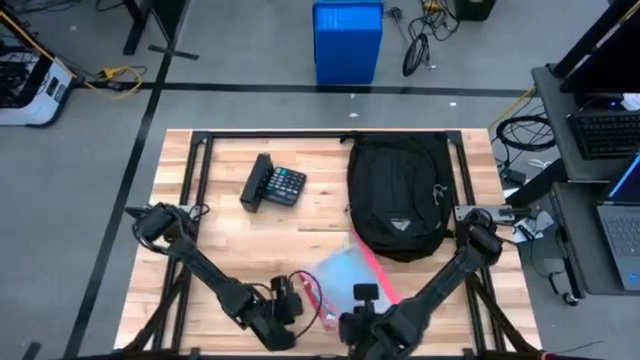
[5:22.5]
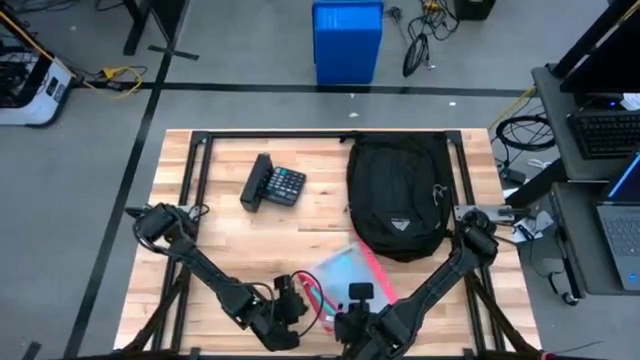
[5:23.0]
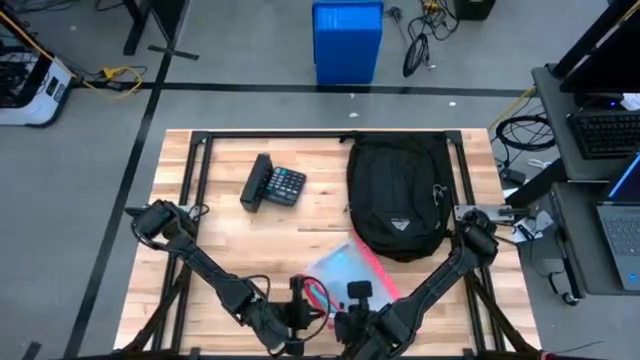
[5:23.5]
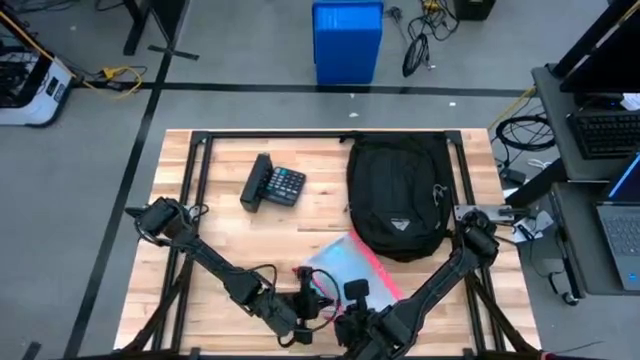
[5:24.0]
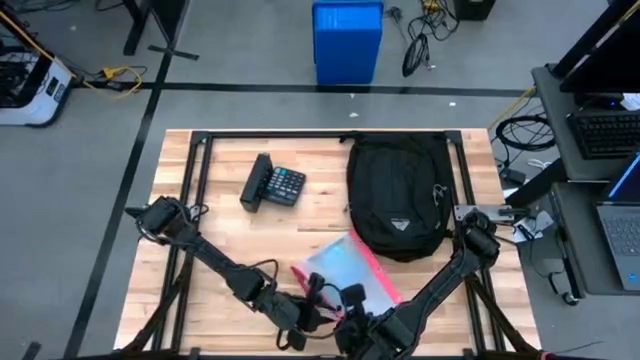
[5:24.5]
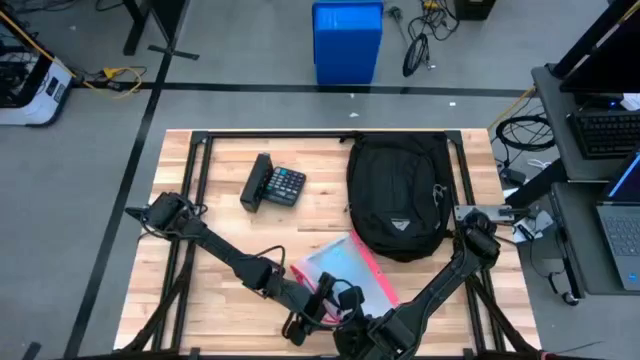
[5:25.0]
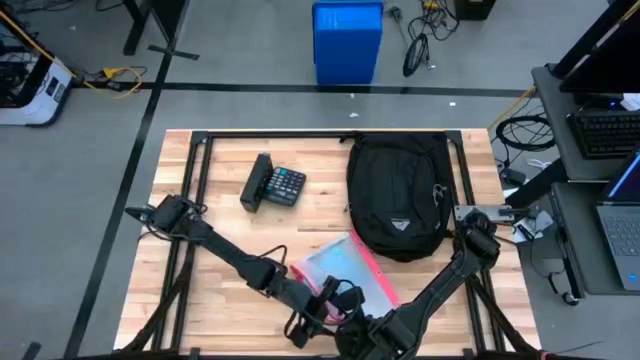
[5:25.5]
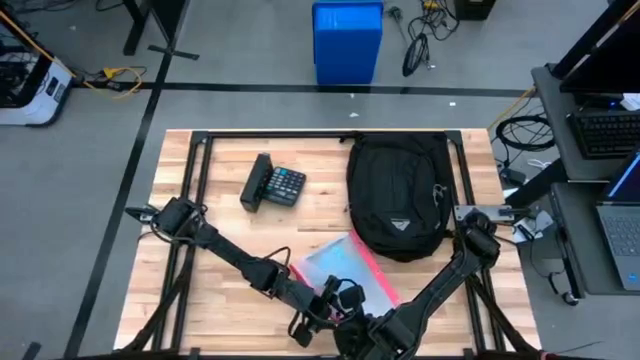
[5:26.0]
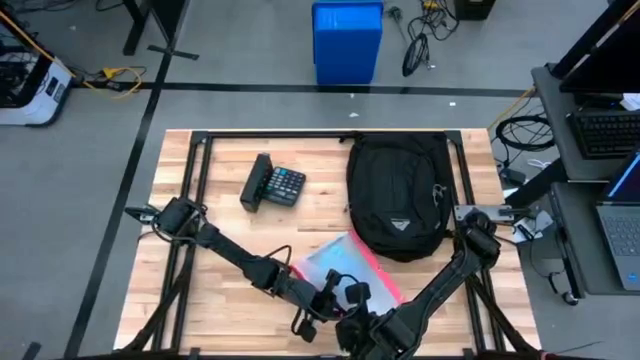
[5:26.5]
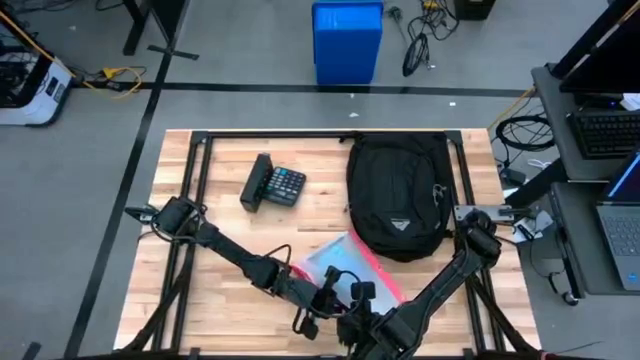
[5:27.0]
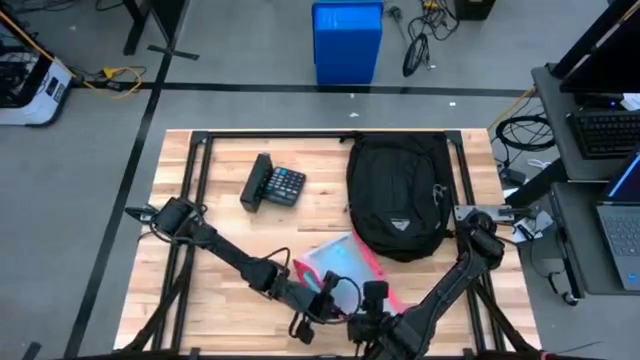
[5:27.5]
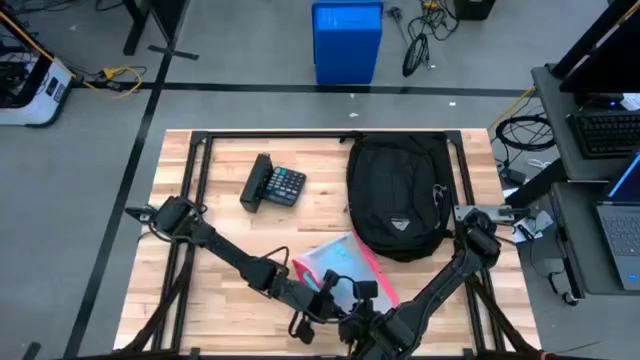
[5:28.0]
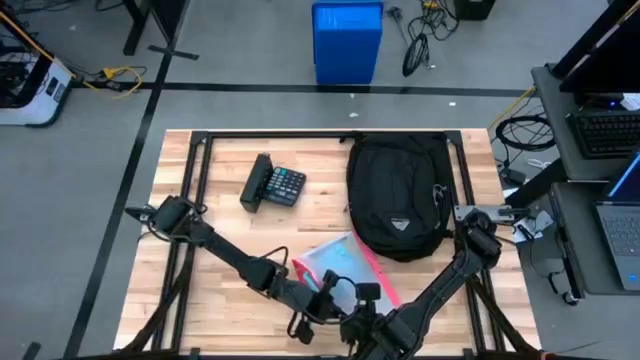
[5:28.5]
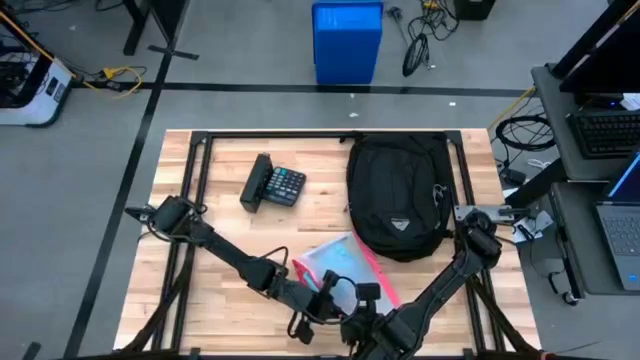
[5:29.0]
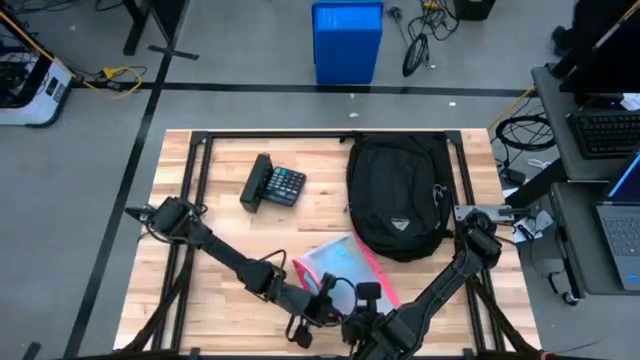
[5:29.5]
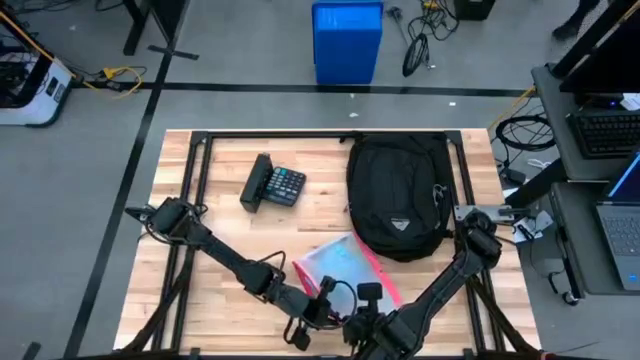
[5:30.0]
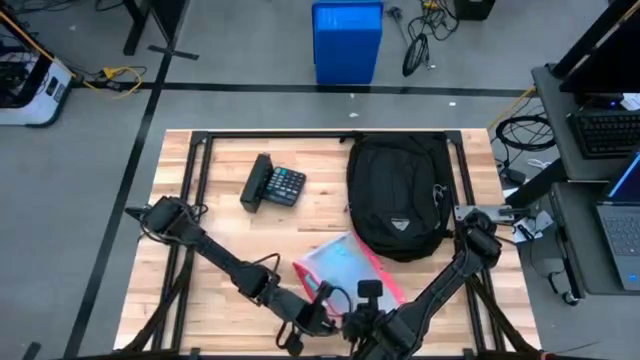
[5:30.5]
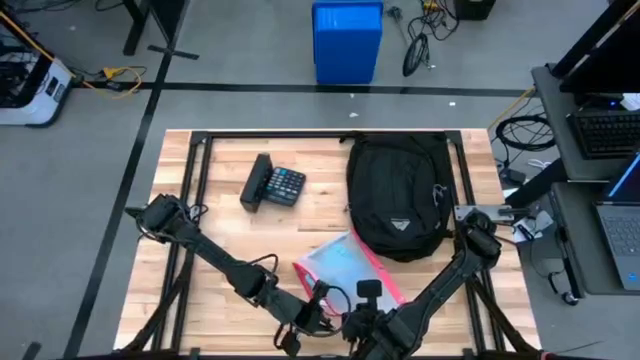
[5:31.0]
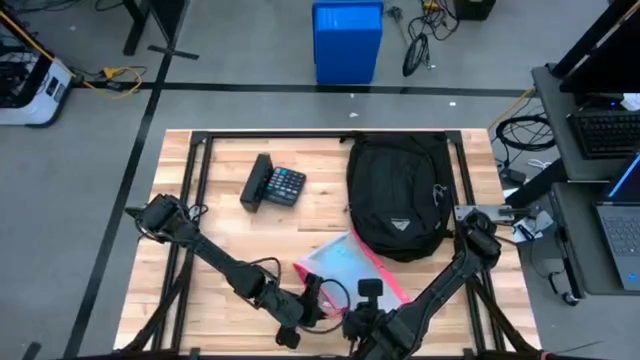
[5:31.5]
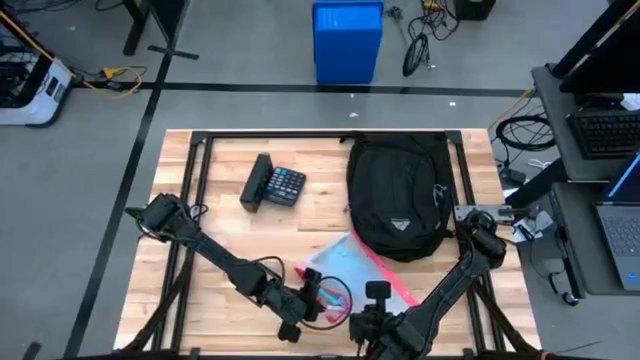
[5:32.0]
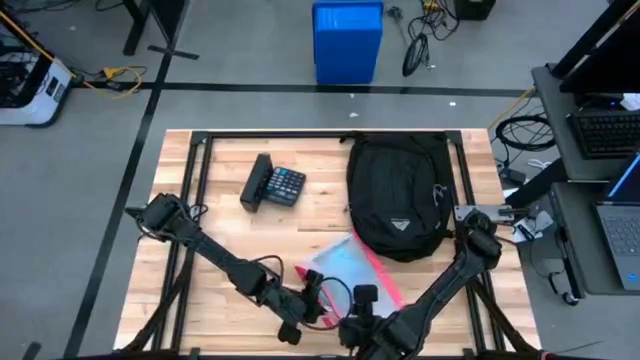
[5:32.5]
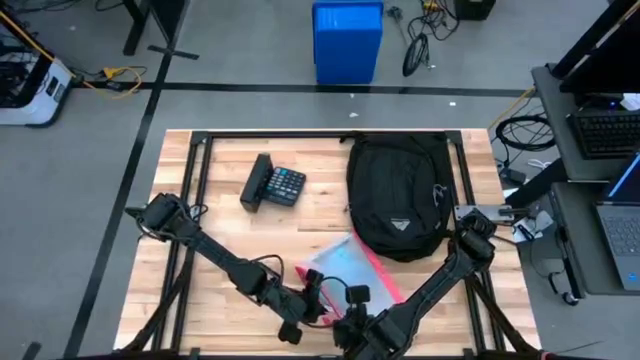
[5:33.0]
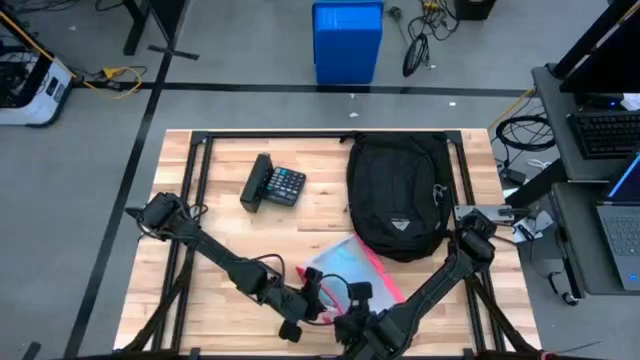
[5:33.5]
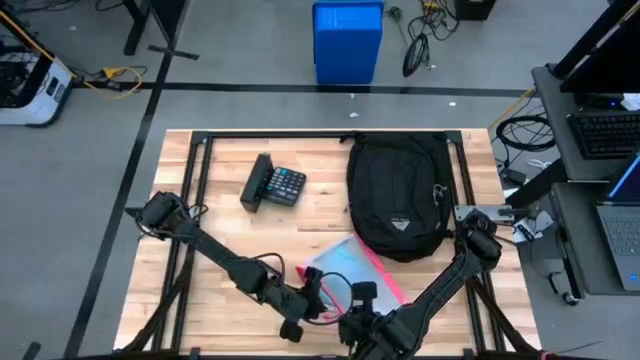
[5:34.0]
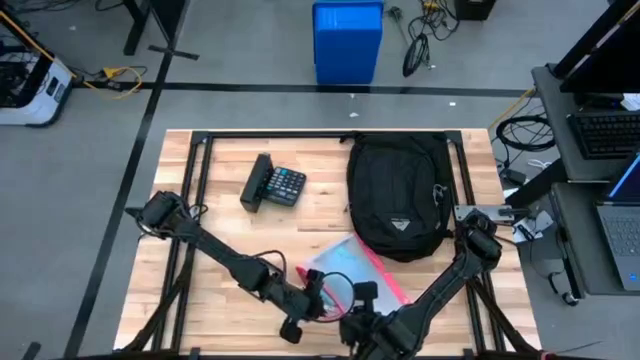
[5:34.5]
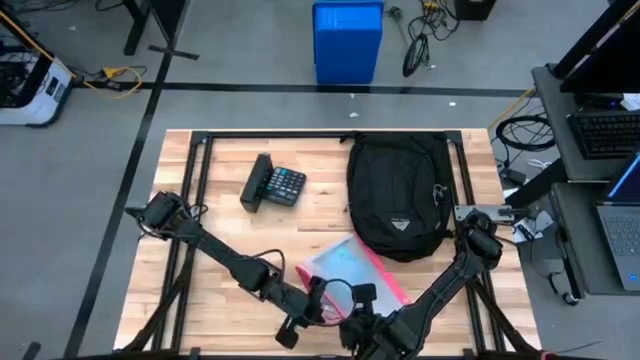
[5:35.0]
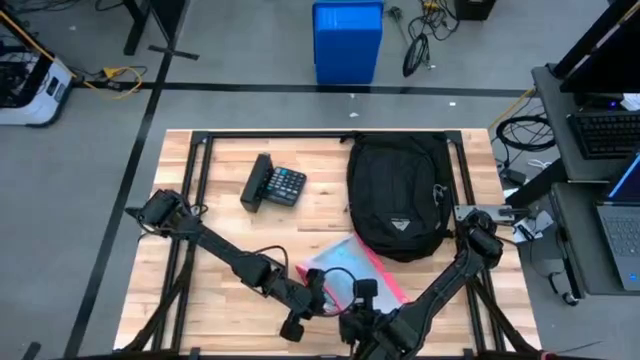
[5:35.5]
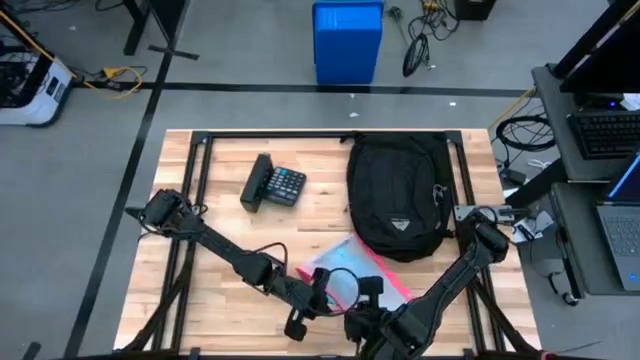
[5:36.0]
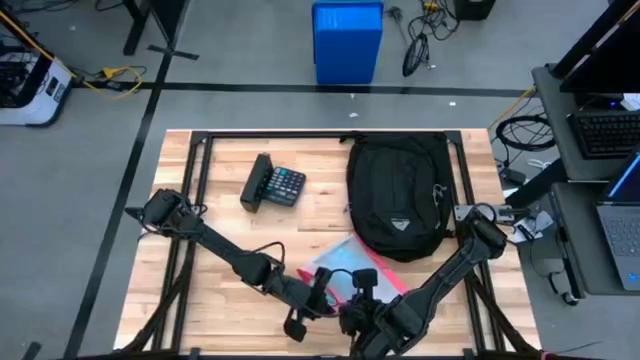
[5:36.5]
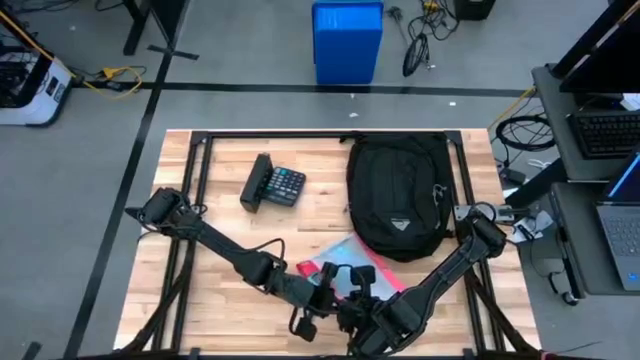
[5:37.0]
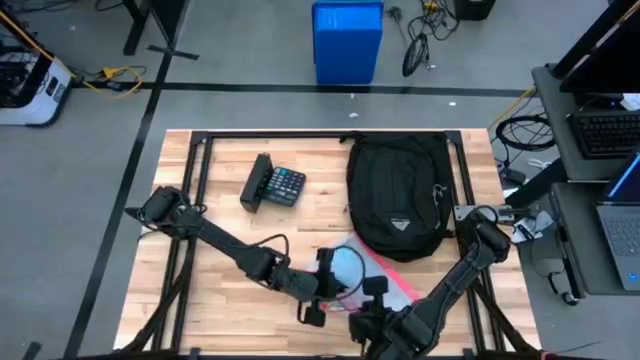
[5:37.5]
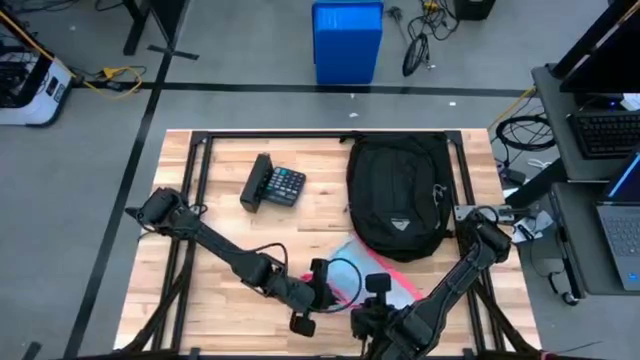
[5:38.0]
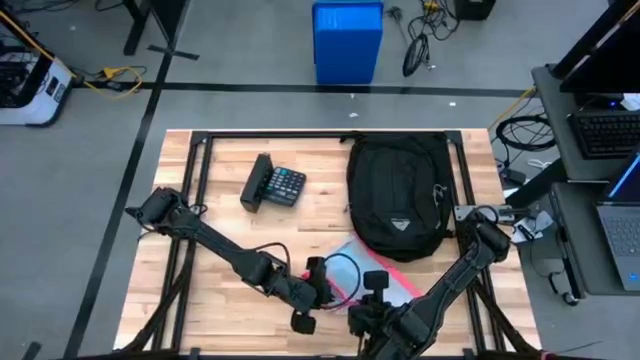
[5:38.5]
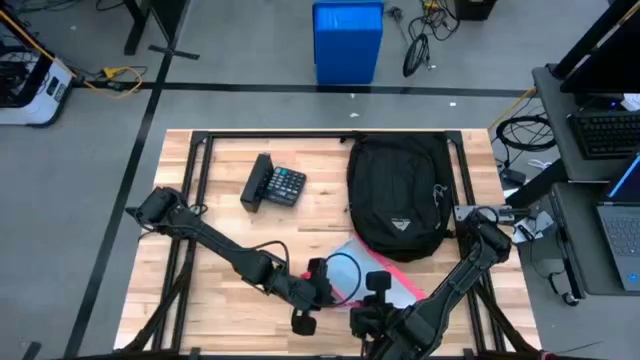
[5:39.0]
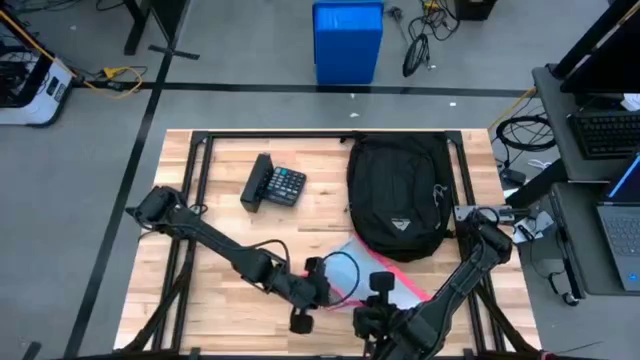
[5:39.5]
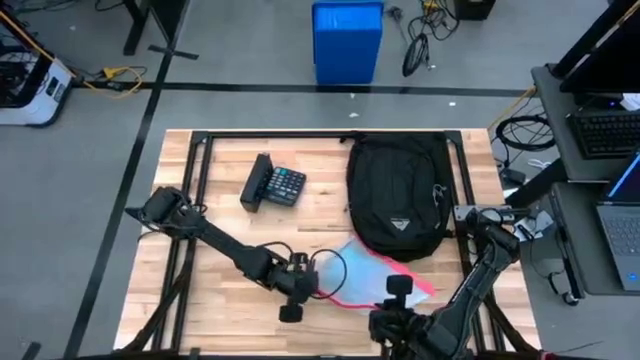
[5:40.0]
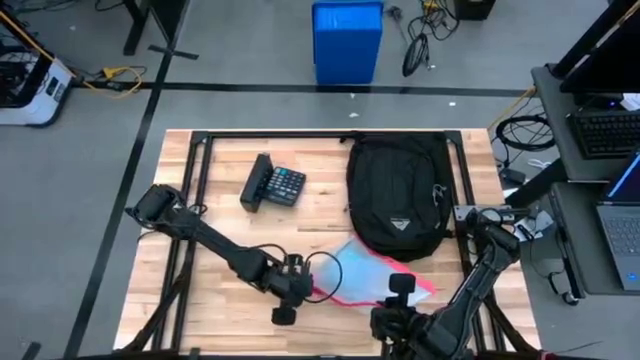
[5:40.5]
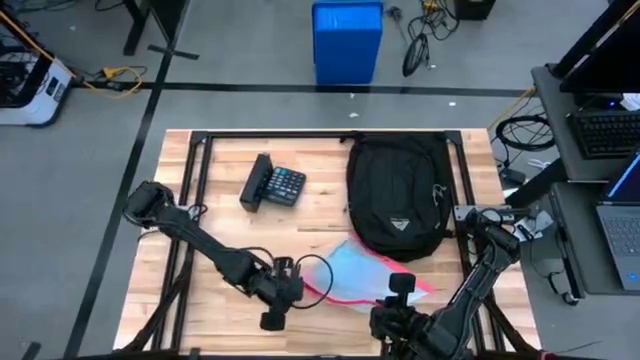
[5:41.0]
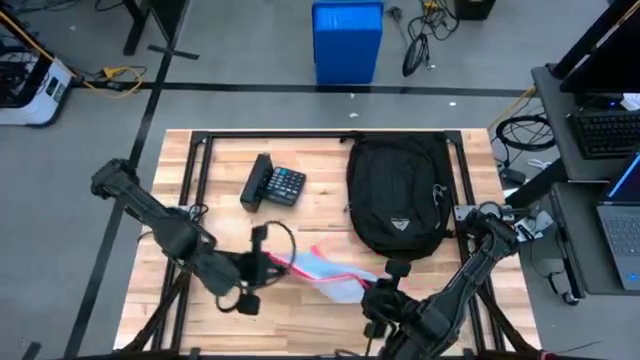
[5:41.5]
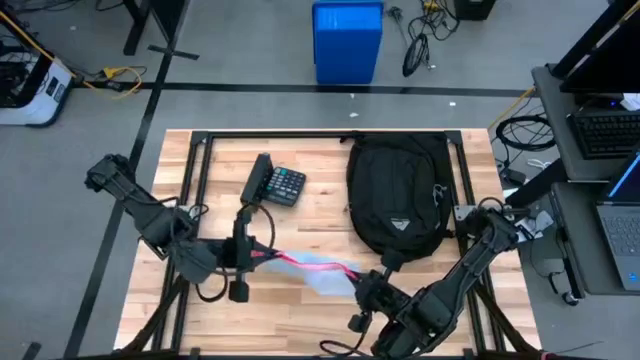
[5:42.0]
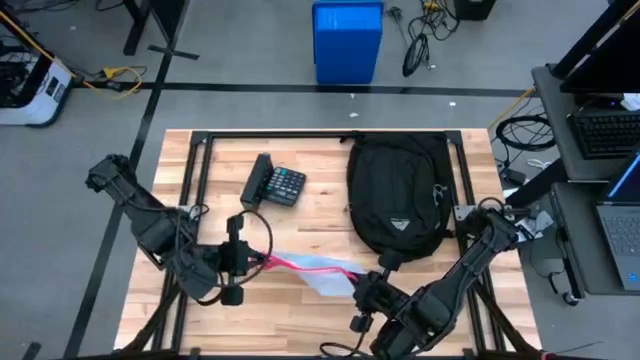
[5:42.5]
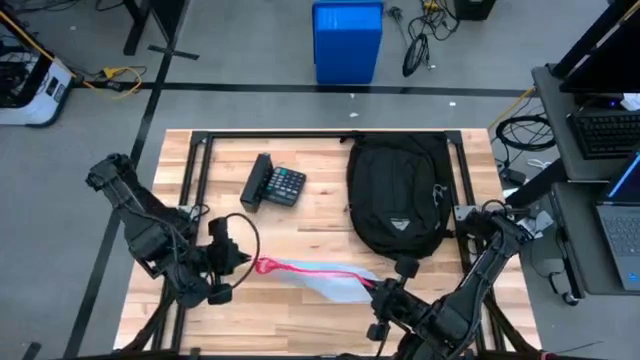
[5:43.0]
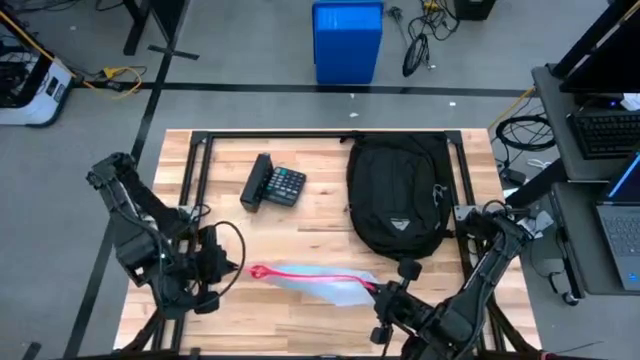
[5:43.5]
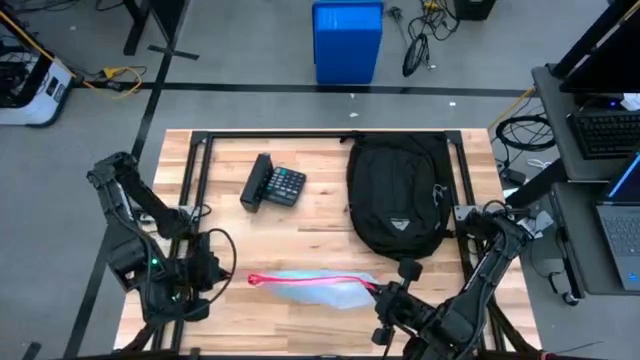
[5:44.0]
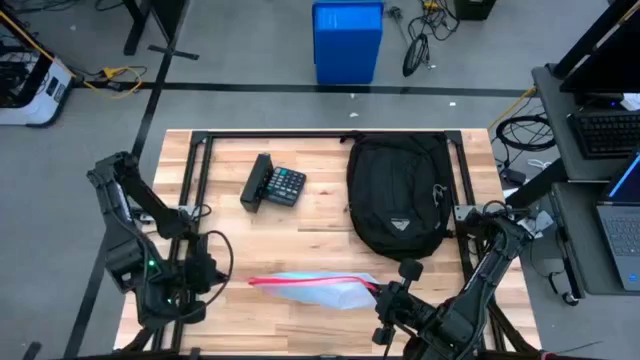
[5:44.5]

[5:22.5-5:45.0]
Task: Unpack backpack
Close the white zip bag
